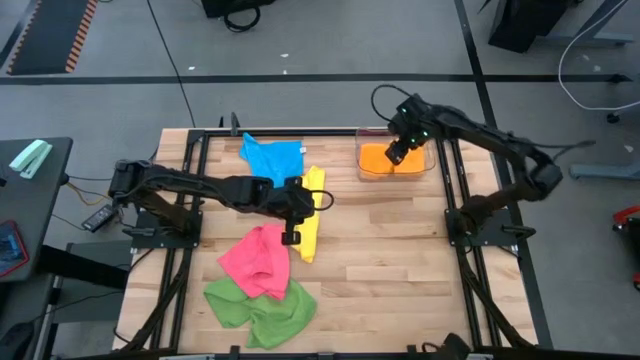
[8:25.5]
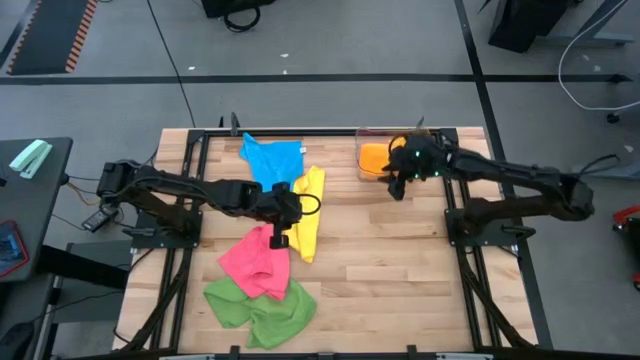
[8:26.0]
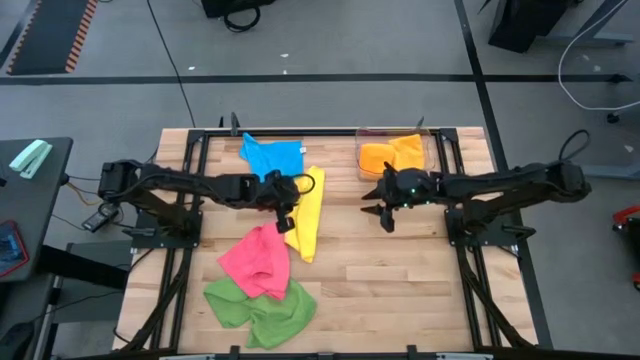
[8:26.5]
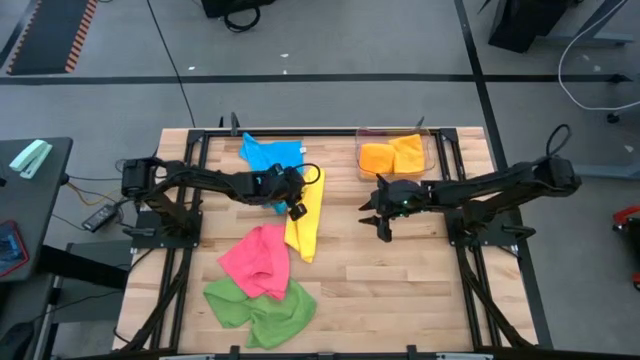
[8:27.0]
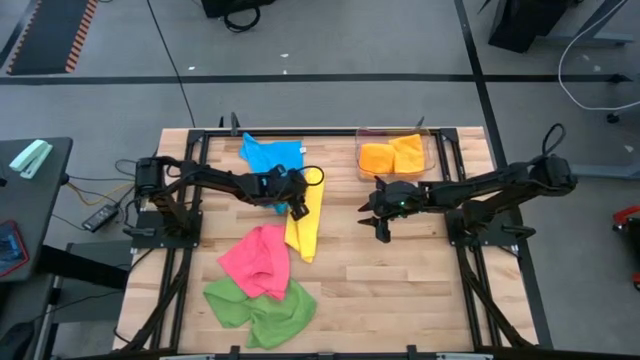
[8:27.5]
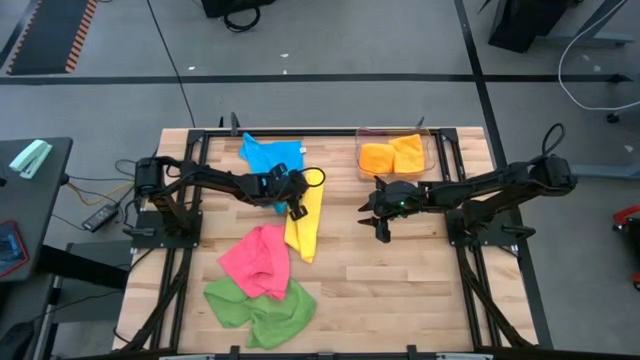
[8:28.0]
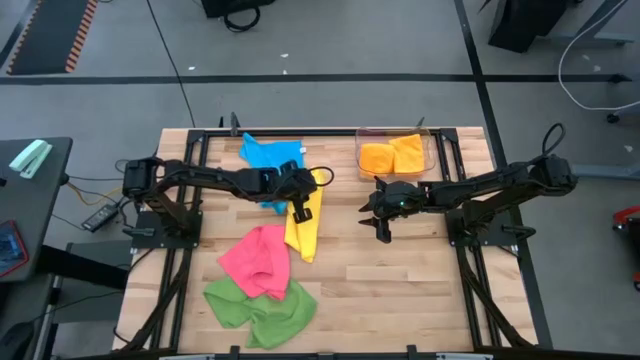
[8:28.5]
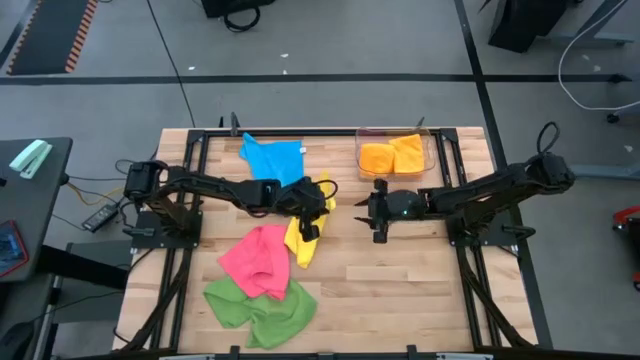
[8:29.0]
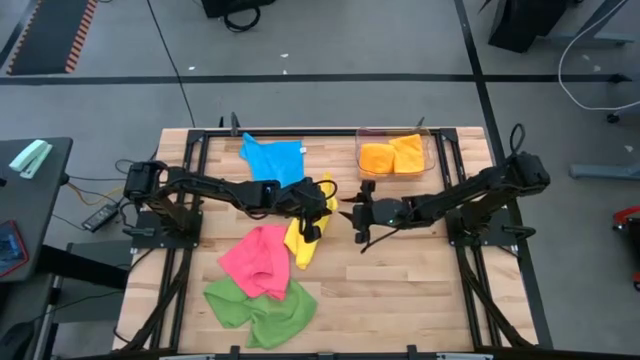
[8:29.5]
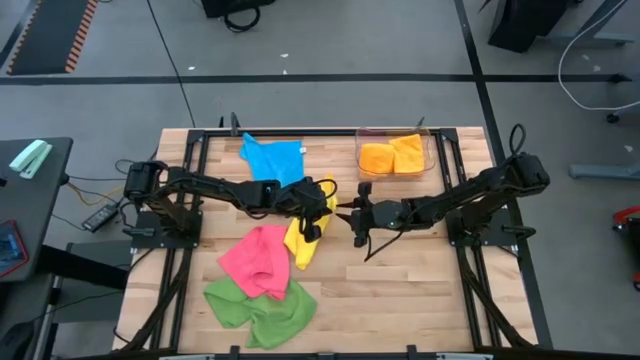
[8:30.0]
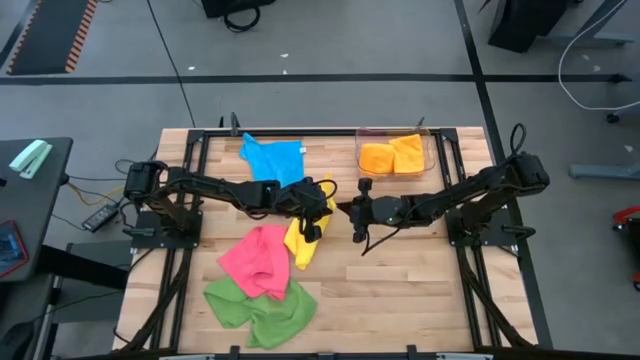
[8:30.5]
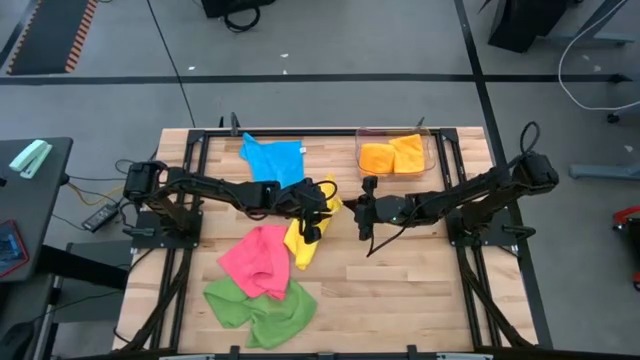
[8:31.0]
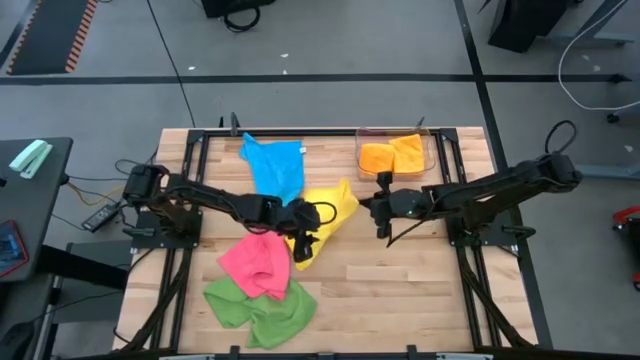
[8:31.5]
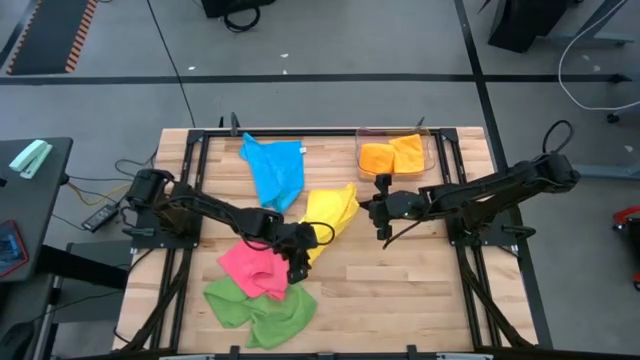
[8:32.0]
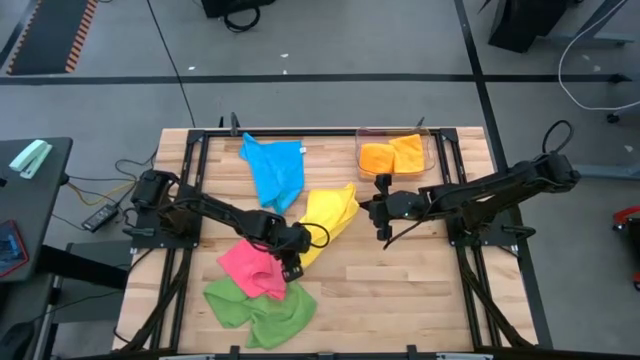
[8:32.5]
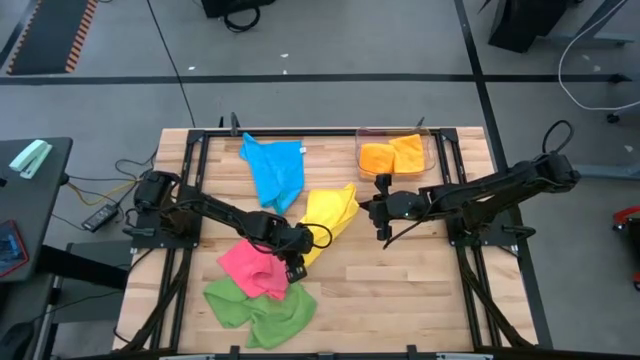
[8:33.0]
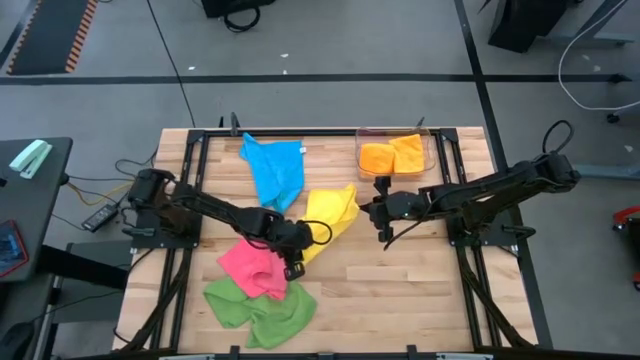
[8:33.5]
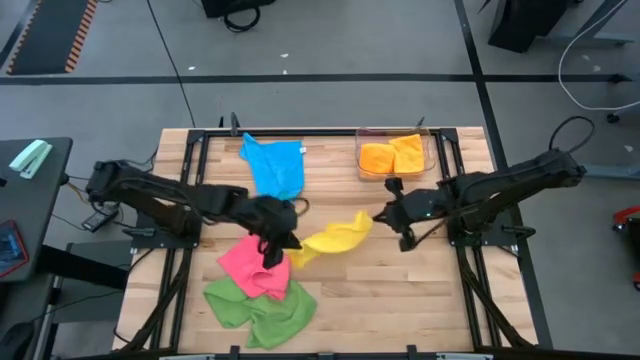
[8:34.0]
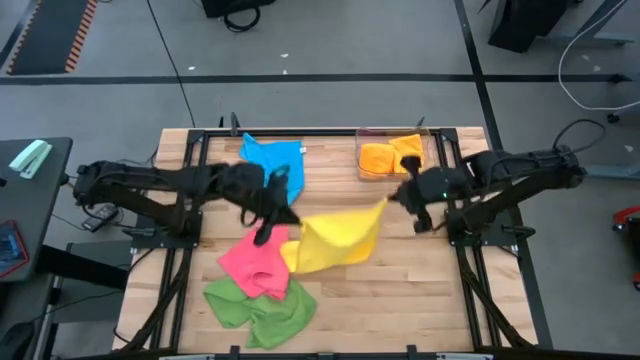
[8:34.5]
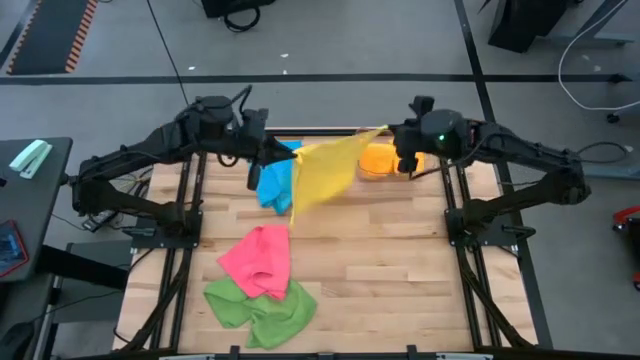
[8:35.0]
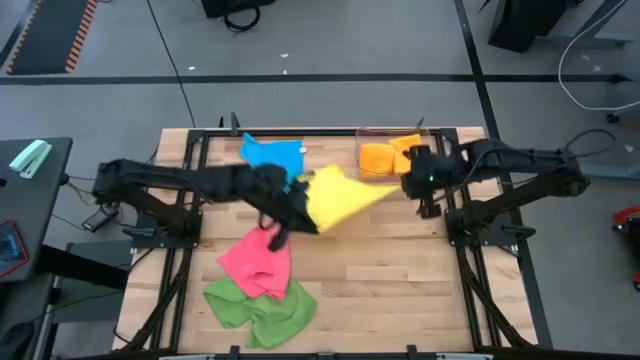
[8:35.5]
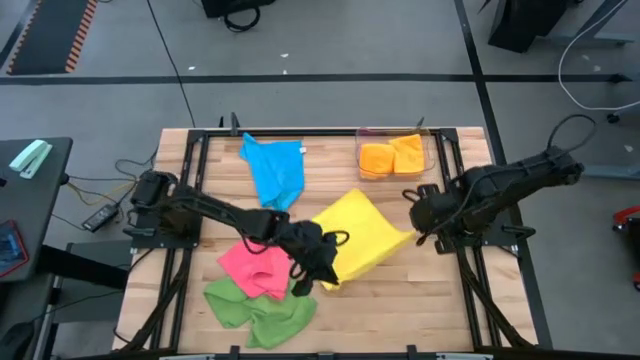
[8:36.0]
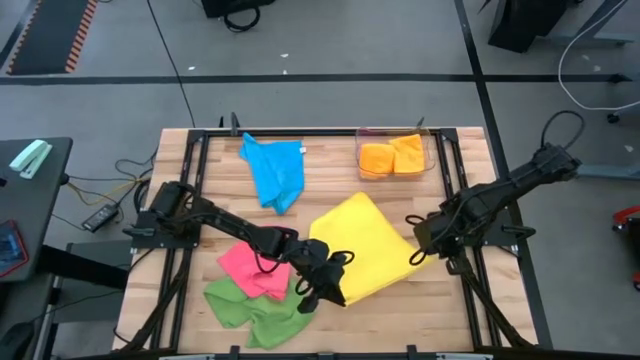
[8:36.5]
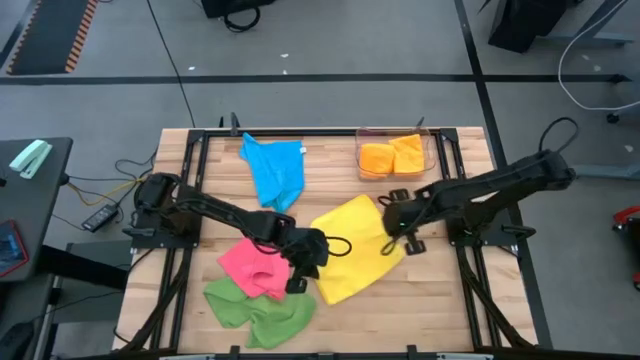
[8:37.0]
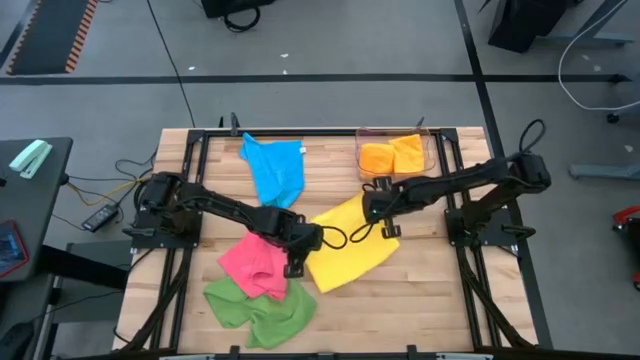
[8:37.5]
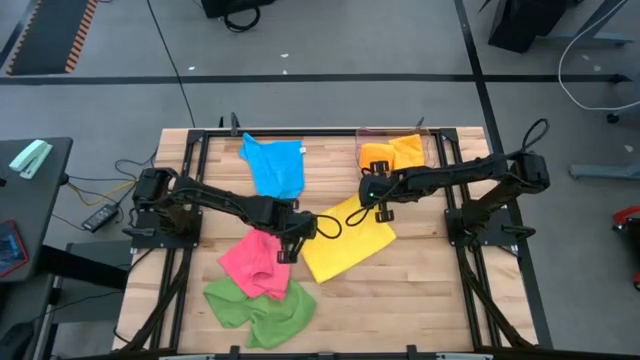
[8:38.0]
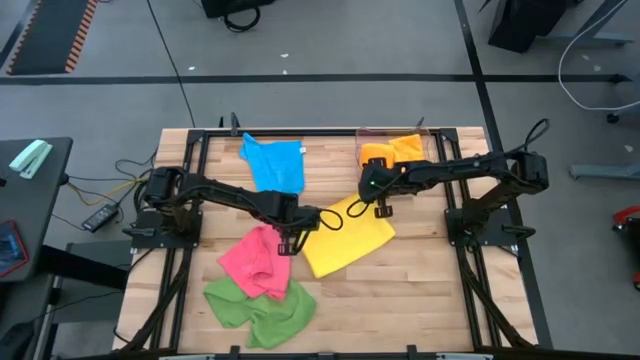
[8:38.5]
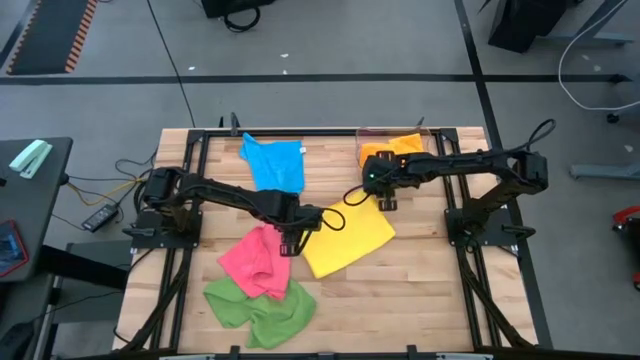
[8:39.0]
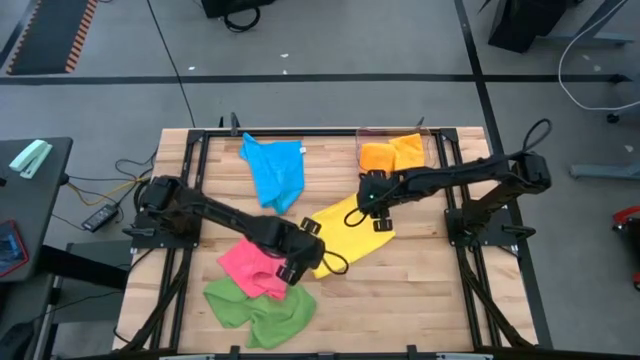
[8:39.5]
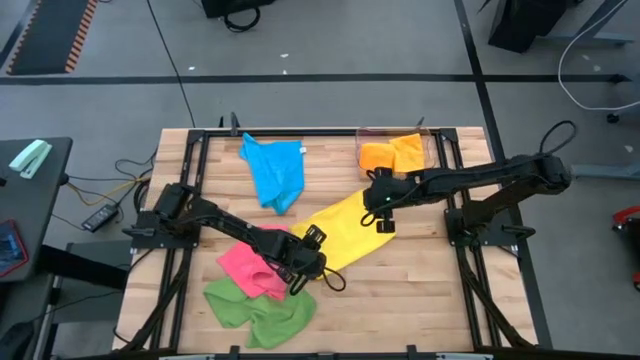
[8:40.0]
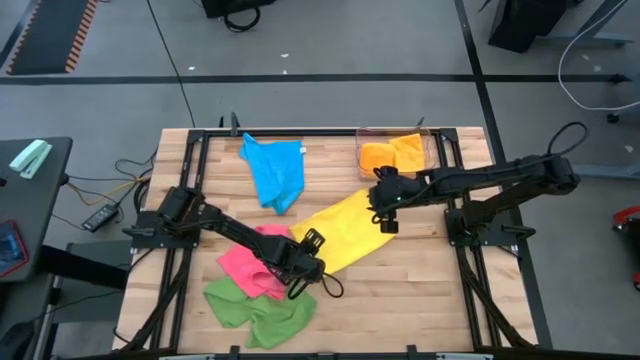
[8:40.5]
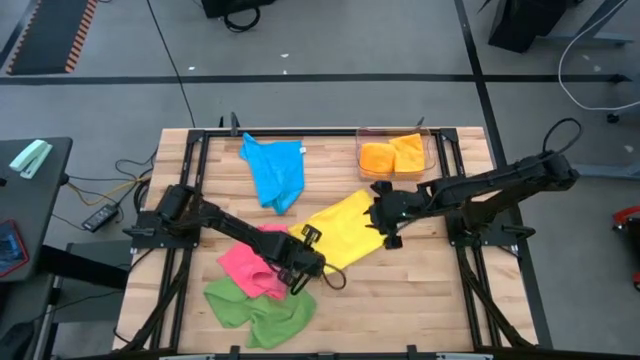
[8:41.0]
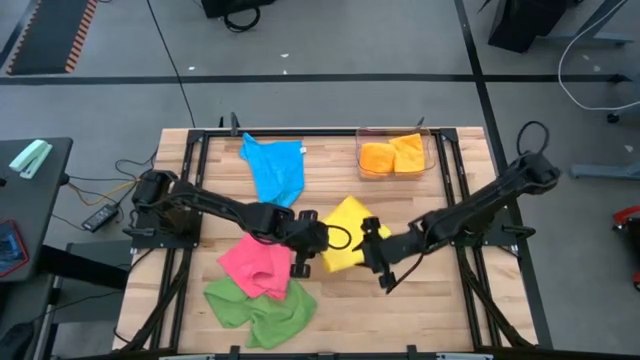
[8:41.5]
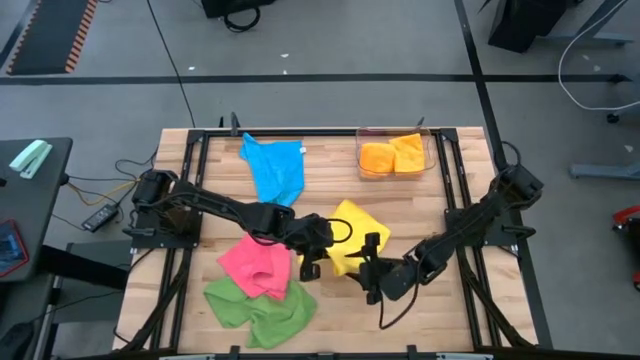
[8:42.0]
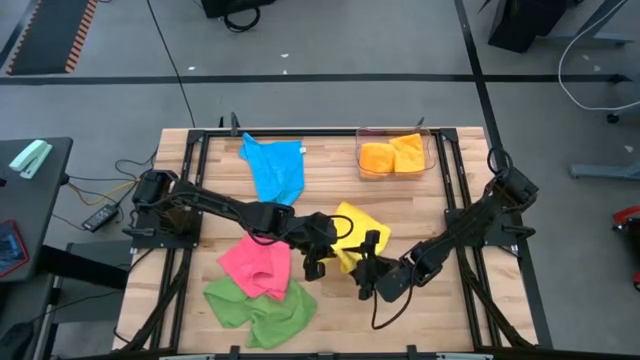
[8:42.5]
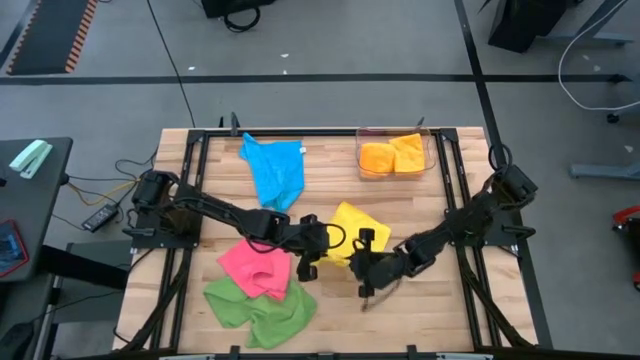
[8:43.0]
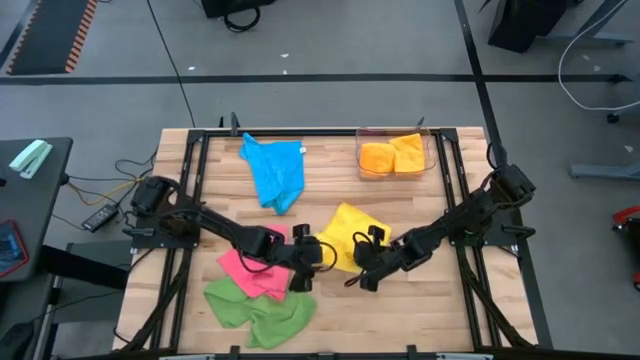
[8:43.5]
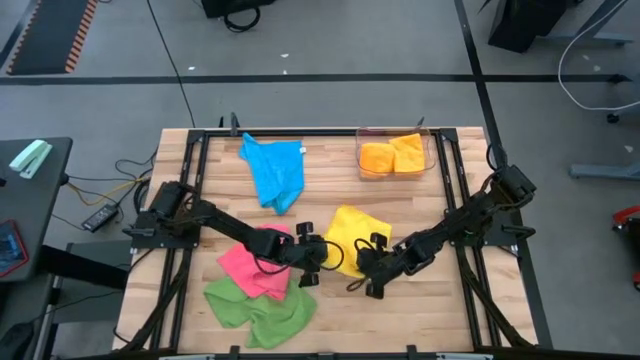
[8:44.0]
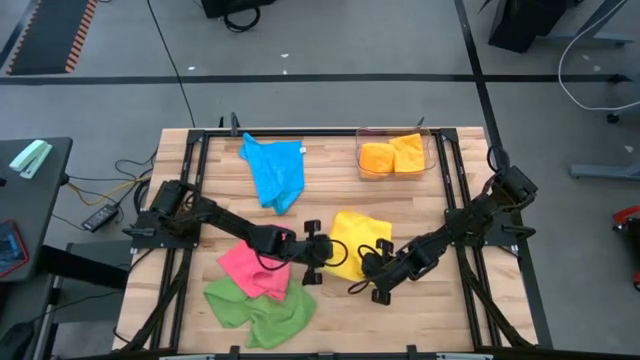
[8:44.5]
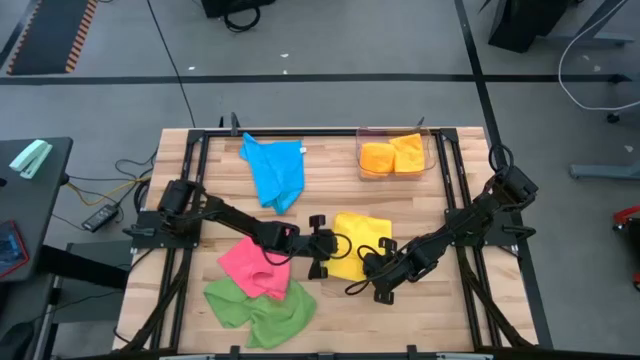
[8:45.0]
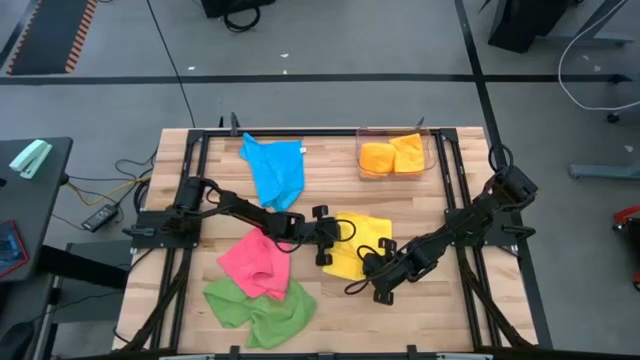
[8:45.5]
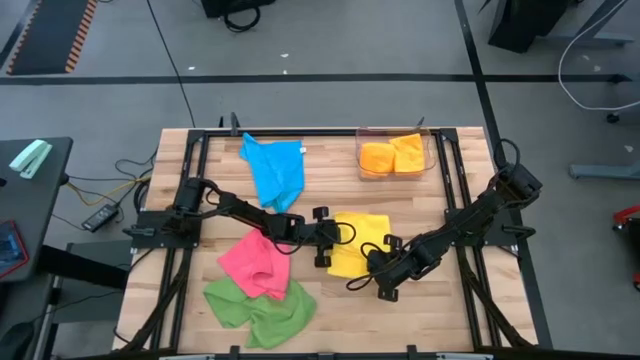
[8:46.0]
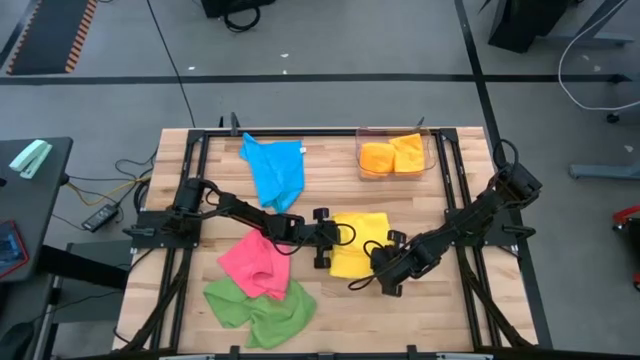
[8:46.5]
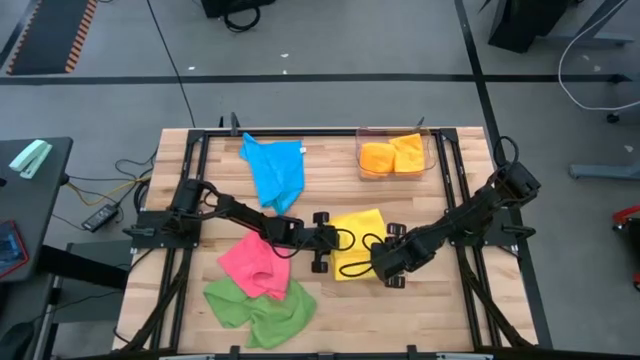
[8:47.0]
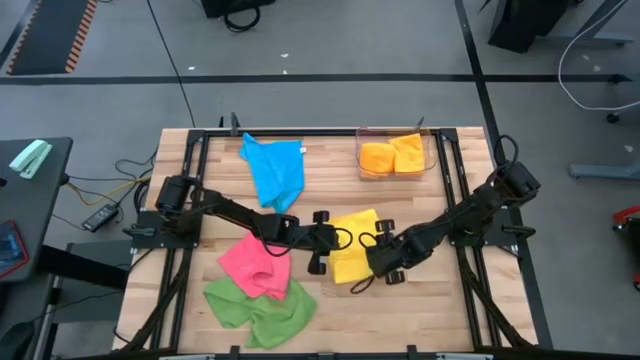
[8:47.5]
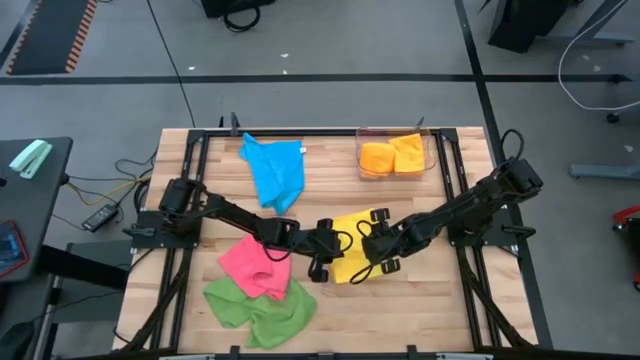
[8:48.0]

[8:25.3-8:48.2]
Task: Fold microfiber towels
Fold the yellow microfiber cloth
